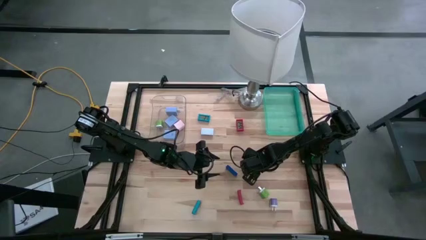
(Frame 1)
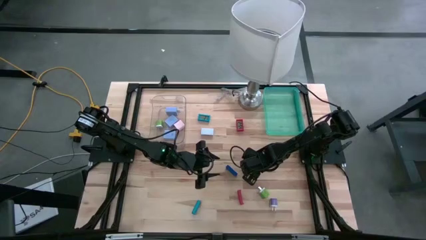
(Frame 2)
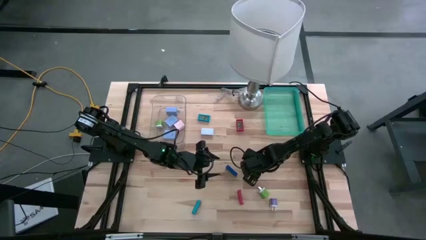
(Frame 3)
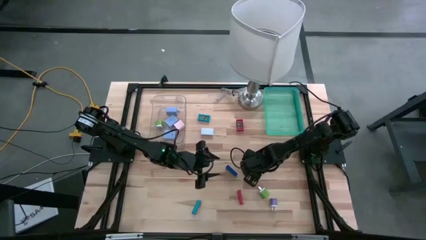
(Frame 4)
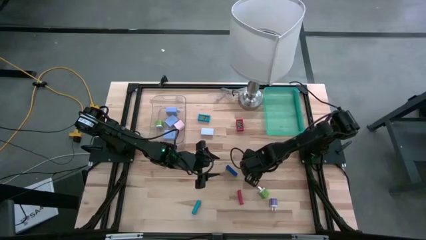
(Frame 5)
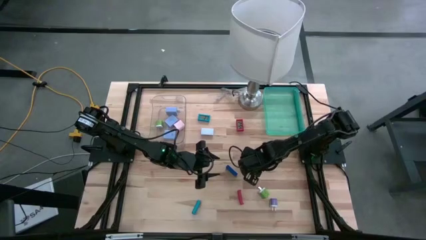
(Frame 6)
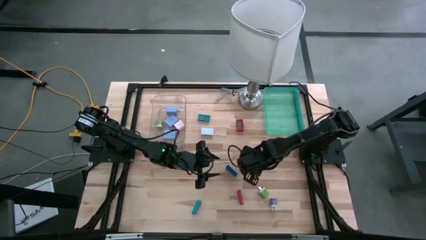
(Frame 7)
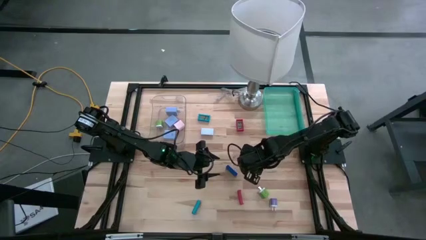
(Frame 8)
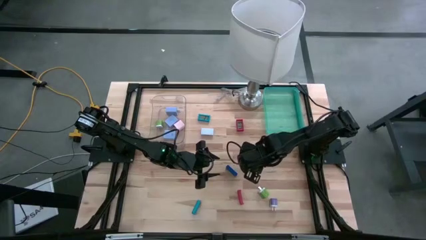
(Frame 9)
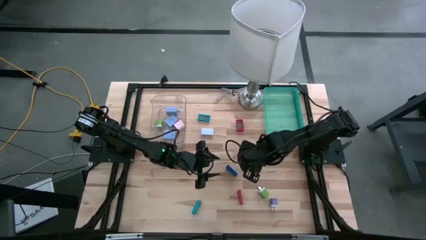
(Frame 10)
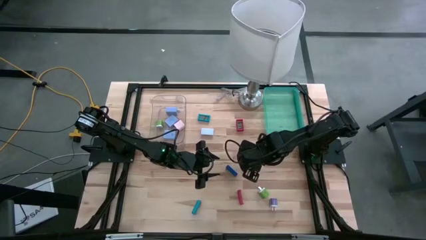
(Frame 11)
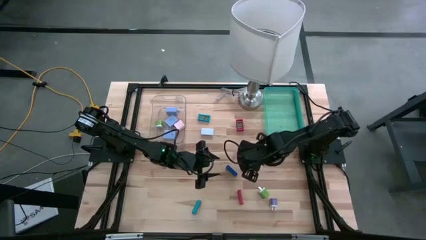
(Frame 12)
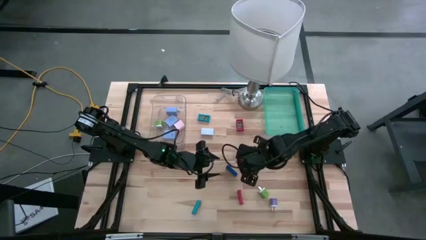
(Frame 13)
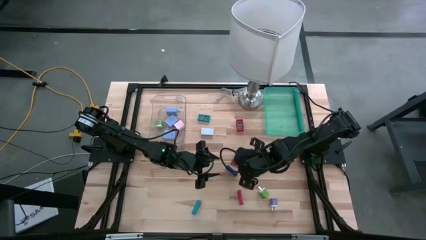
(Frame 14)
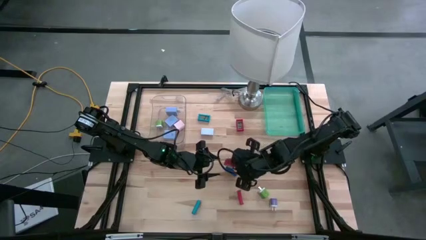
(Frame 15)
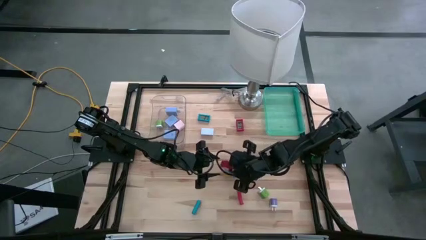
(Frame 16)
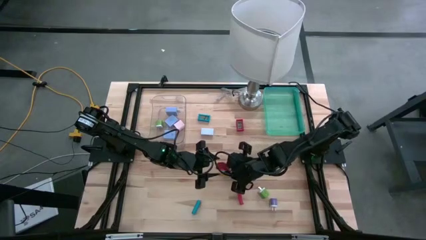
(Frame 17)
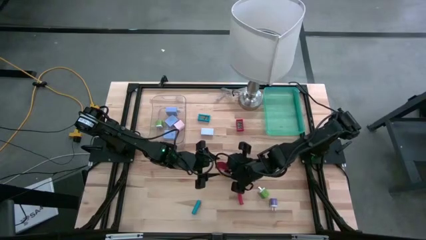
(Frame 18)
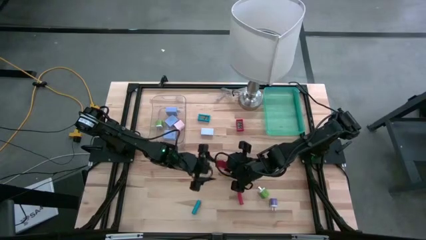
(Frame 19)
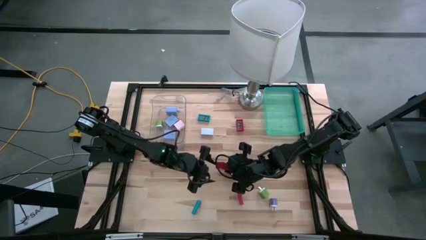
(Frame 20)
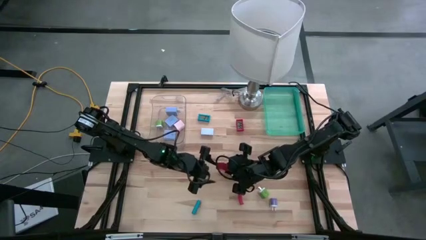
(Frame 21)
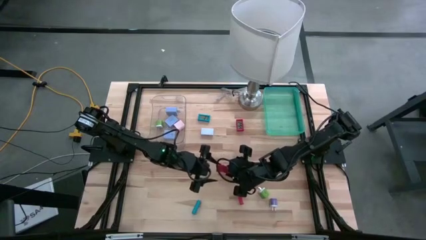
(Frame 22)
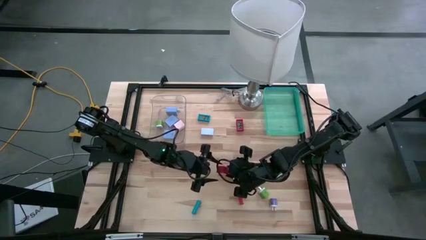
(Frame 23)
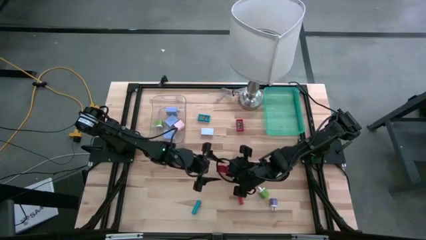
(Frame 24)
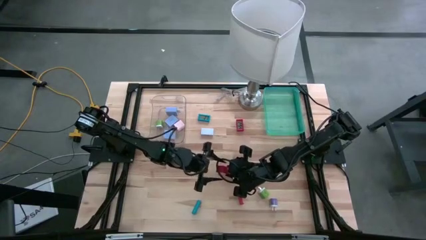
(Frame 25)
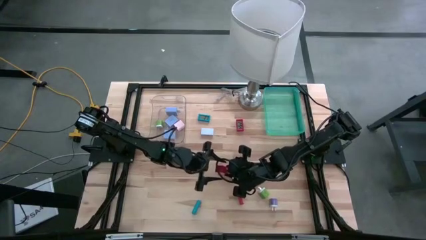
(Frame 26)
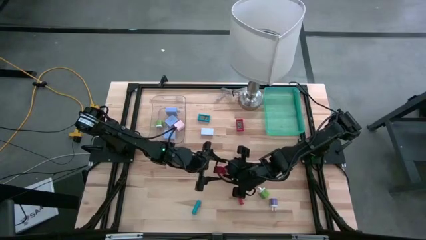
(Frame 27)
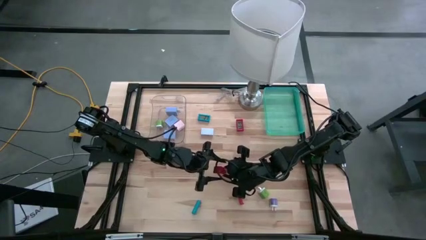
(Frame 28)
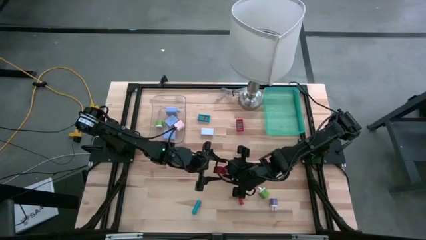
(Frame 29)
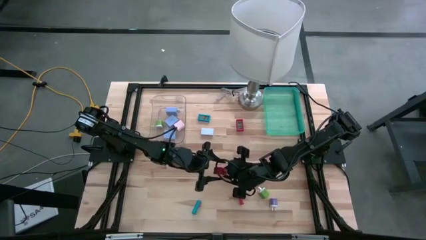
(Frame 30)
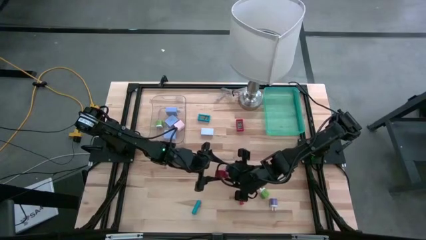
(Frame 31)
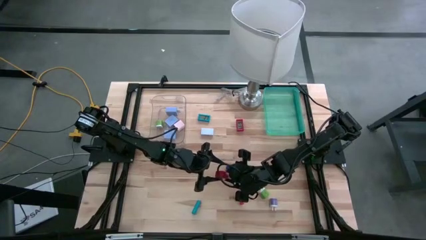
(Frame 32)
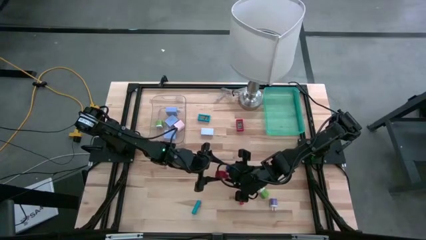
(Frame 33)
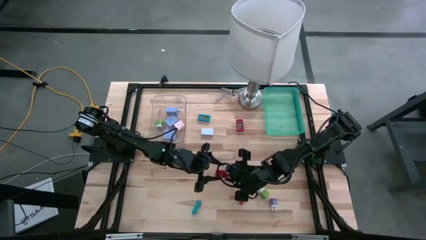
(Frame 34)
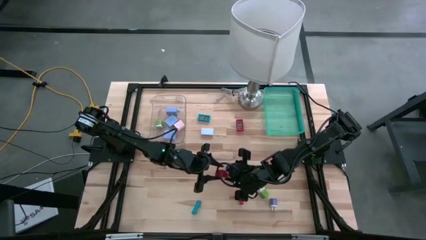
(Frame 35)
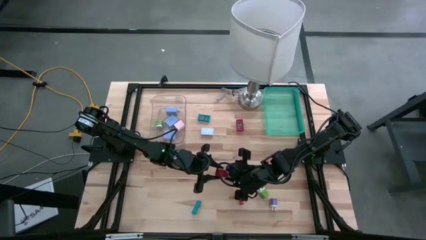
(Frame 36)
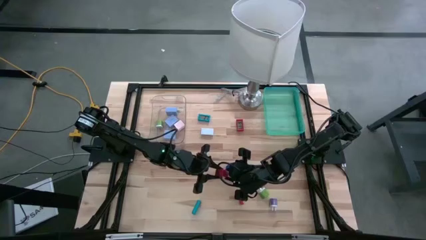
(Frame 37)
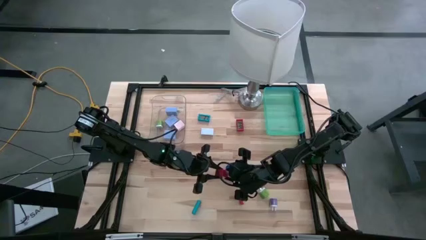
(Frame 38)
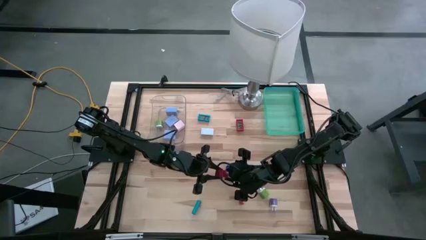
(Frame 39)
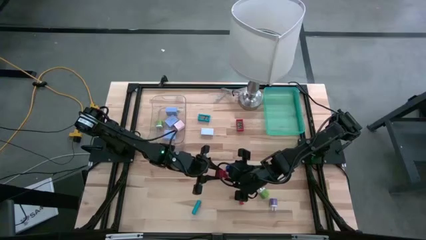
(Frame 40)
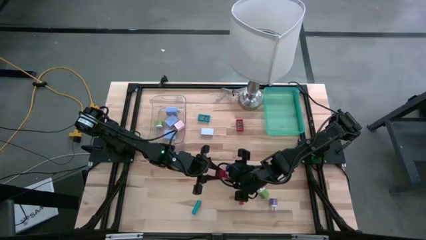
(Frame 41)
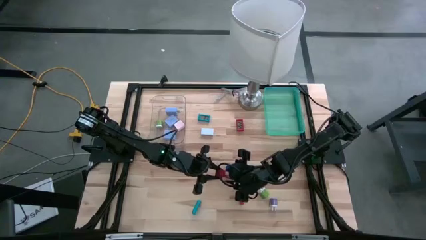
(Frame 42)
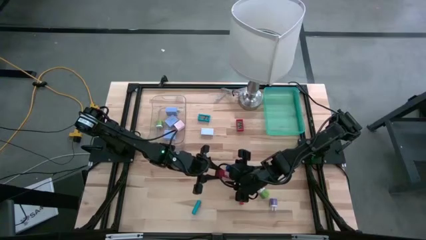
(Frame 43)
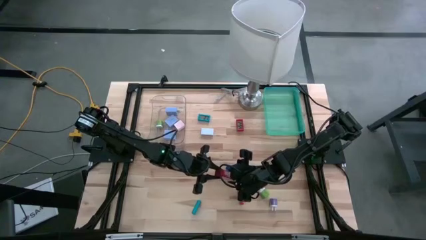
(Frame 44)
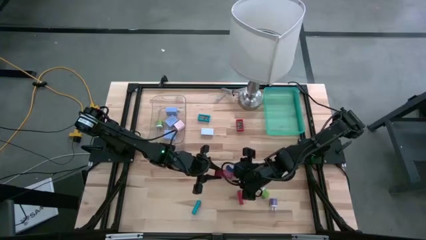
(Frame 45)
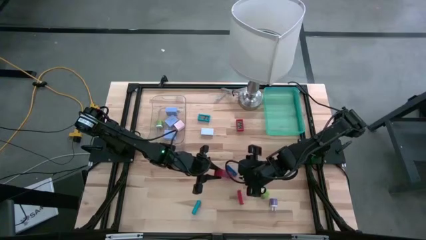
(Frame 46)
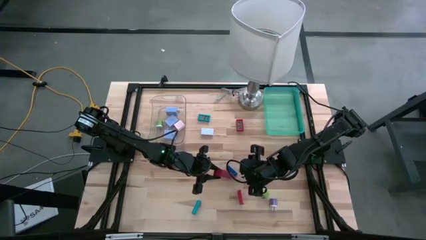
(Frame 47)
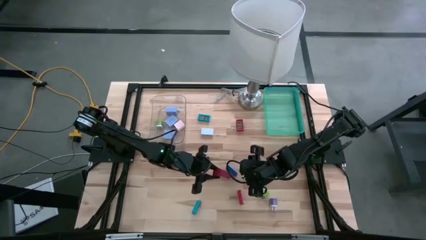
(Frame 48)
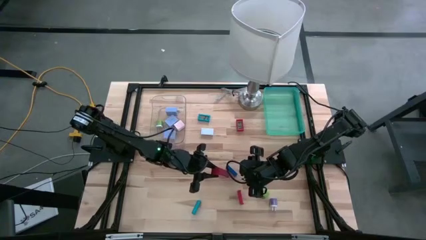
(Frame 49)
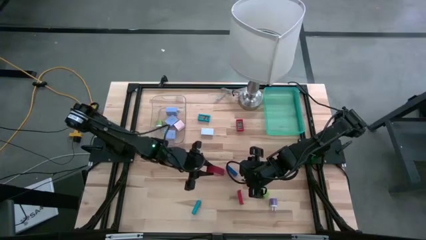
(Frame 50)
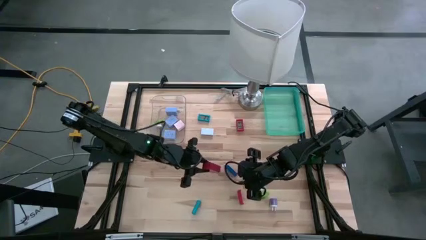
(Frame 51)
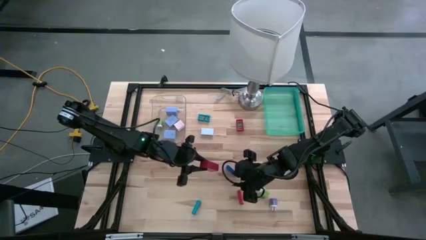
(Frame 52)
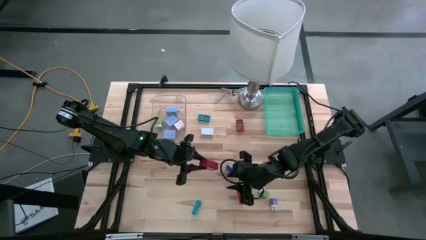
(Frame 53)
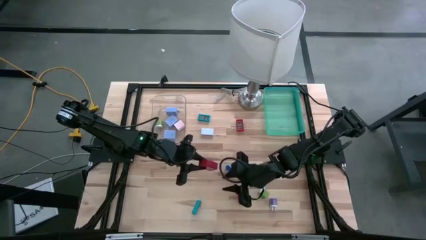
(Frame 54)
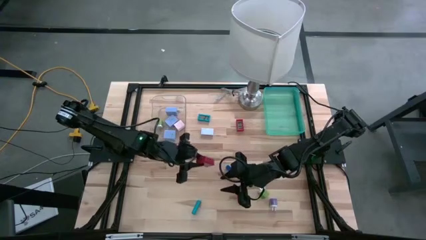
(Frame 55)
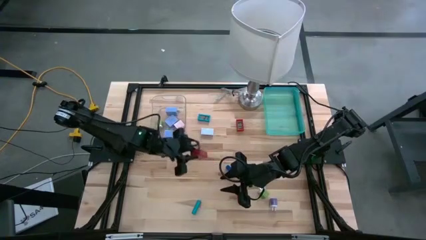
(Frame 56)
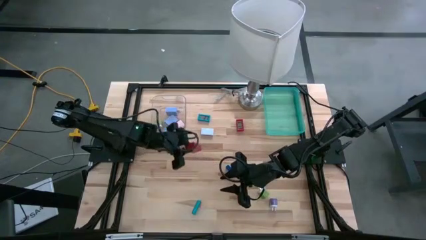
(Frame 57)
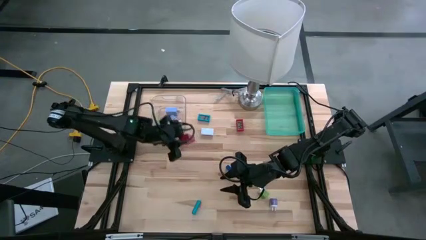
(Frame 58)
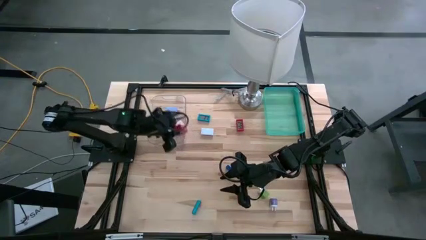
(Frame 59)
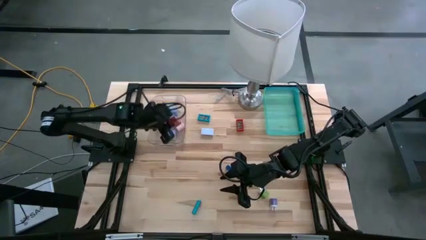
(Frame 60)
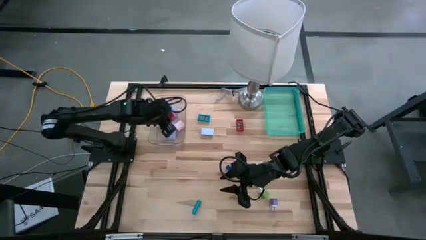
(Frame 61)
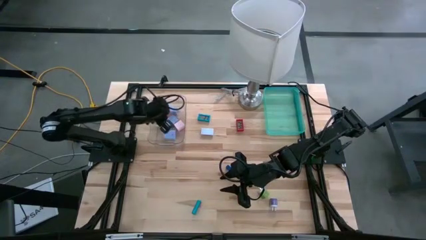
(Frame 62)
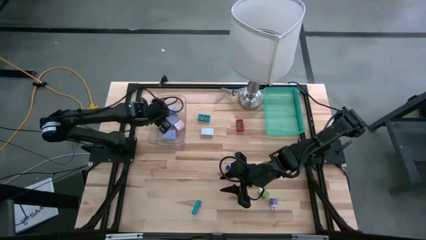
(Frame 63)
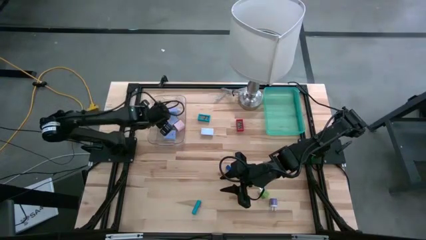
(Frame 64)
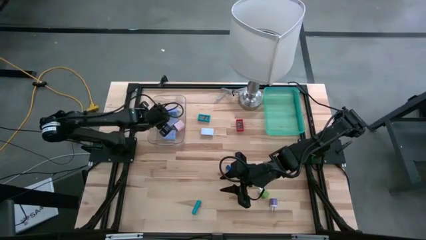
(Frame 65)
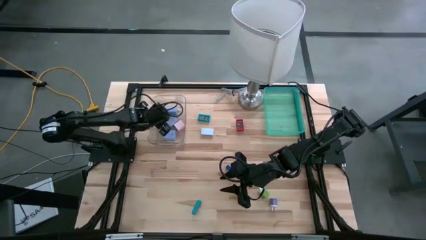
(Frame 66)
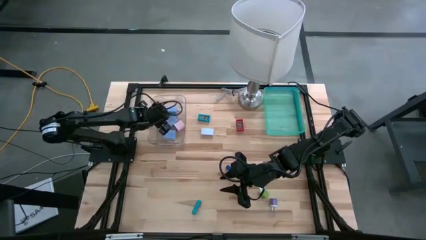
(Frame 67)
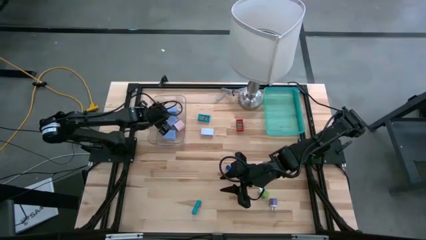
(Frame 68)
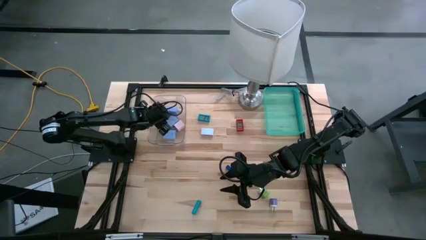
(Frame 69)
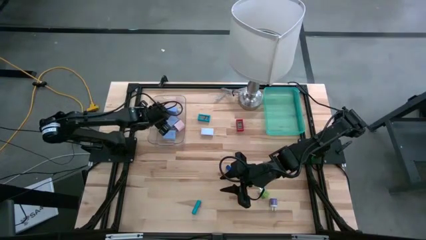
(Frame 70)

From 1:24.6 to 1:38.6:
Task: Pick & Place Office items
Put the red charger adapter into the transparent bin

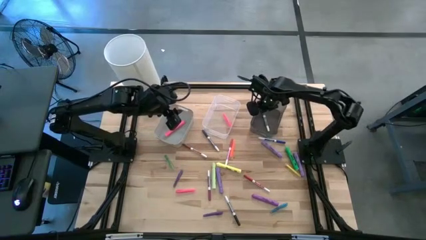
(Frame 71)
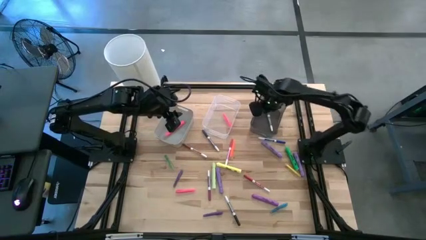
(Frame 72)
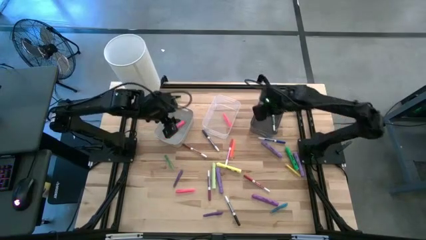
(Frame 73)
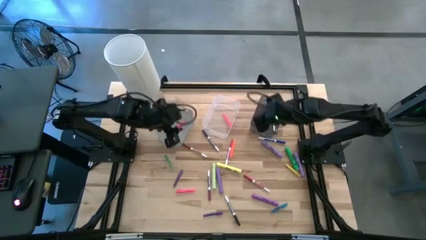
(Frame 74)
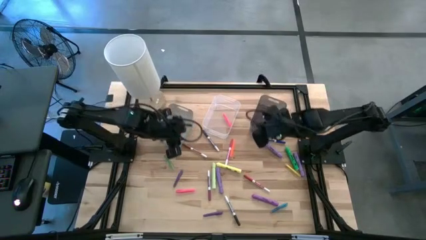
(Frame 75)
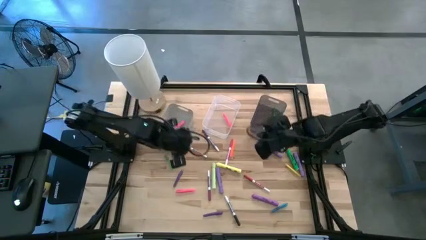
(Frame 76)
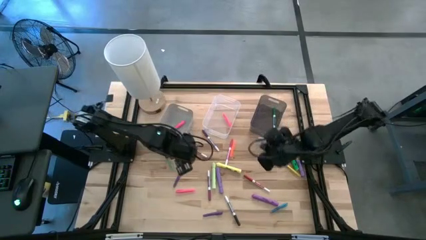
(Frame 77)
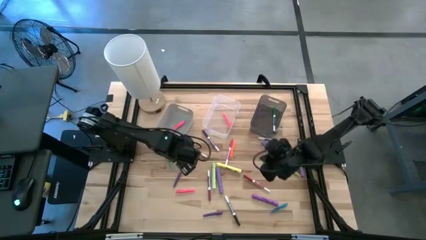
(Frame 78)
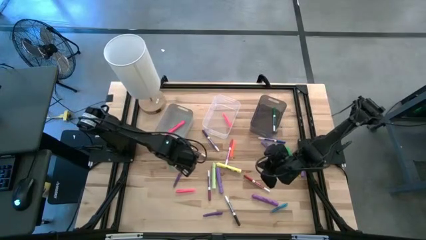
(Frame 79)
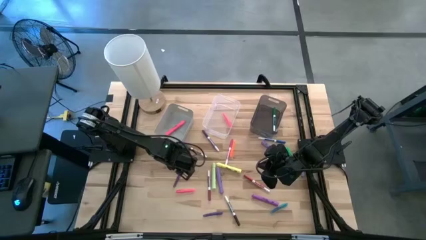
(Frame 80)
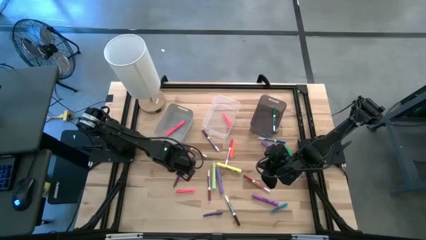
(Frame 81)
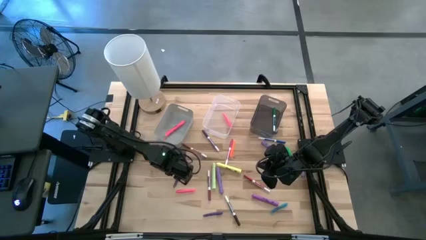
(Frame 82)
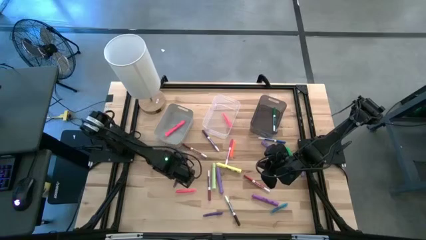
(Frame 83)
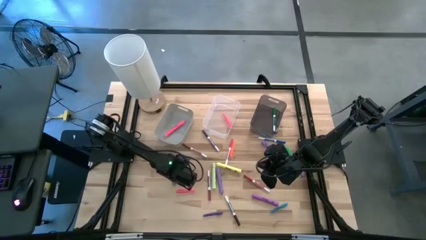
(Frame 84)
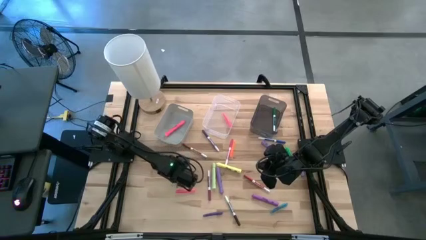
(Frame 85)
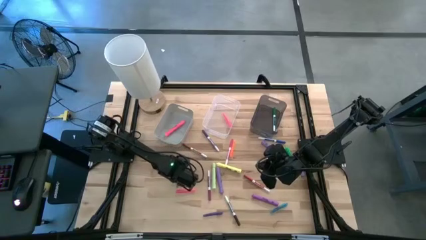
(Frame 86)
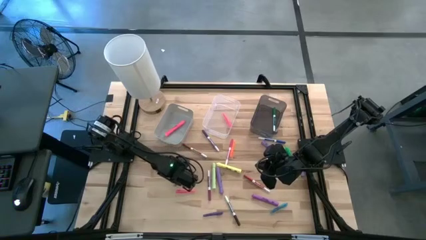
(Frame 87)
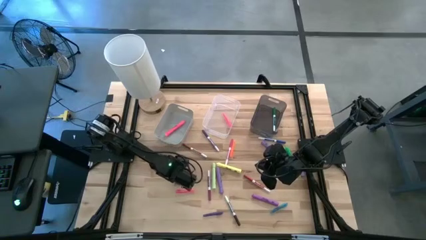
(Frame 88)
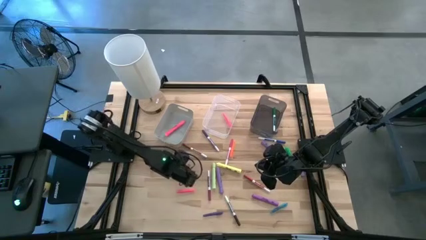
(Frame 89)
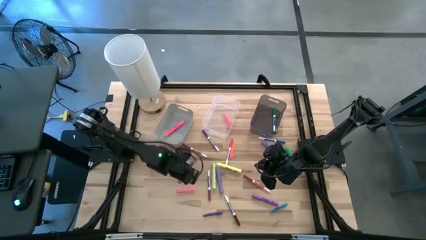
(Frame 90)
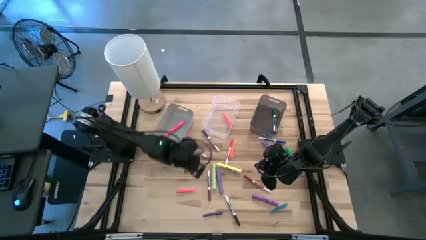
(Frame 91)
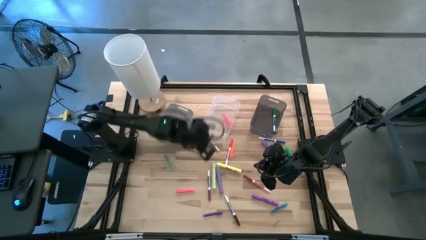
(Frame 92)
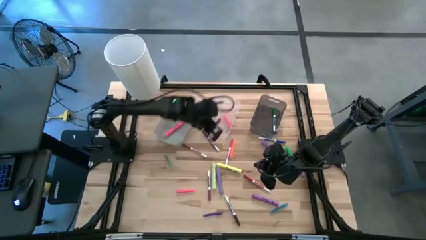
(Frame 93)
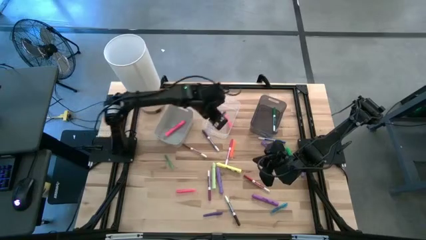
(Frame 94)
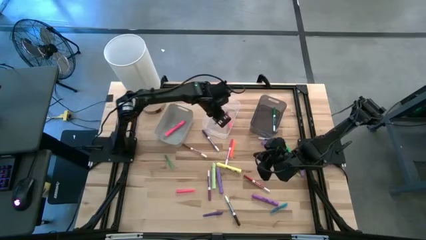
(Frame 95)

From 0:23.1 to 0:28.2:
Task: Pick & Place Markers
Put the purple pen into the transparent bin
